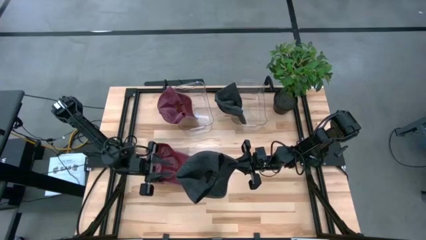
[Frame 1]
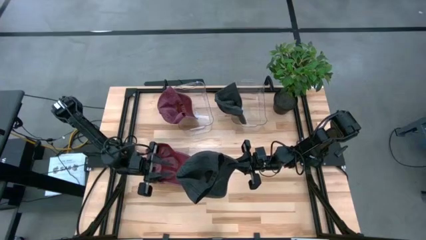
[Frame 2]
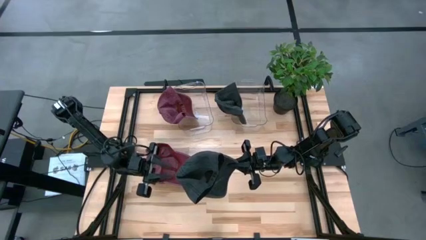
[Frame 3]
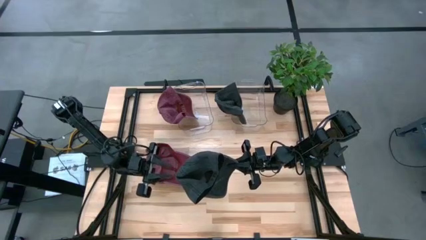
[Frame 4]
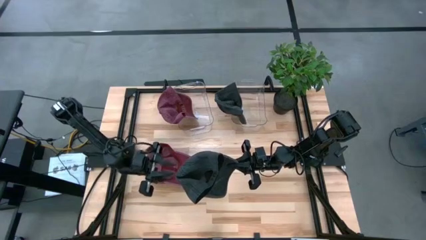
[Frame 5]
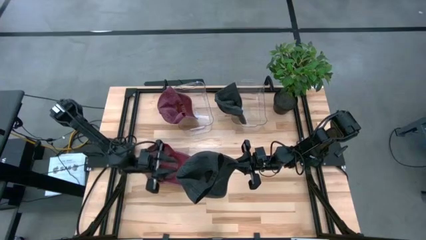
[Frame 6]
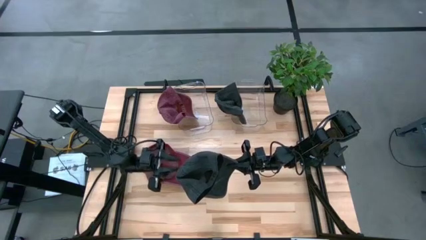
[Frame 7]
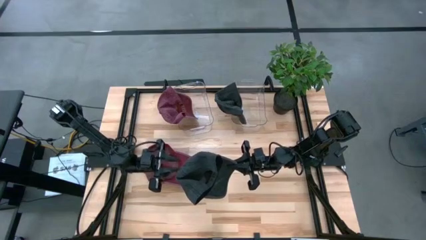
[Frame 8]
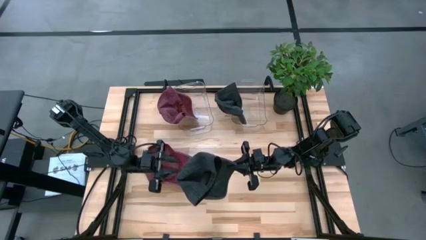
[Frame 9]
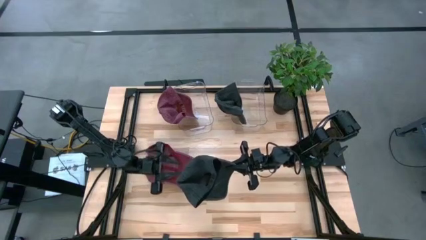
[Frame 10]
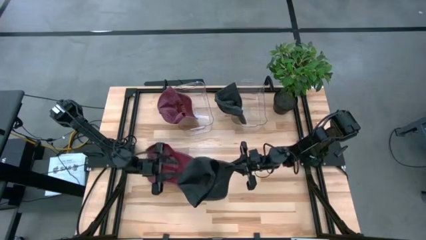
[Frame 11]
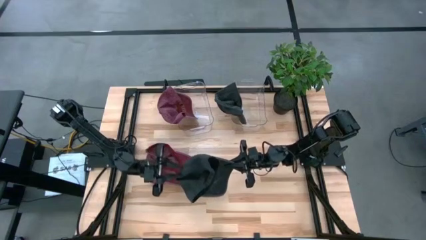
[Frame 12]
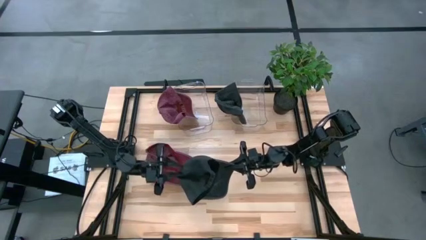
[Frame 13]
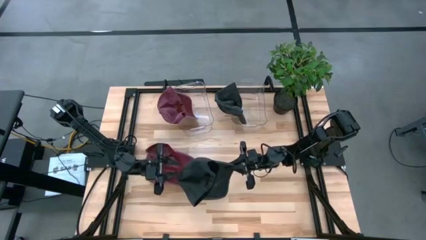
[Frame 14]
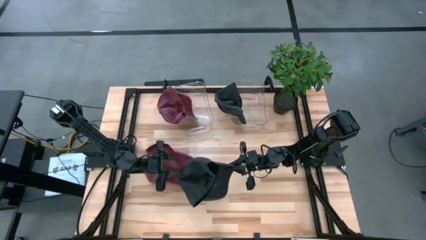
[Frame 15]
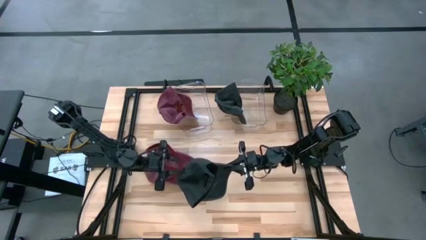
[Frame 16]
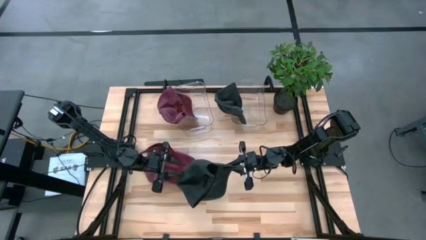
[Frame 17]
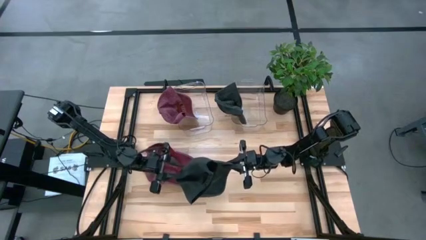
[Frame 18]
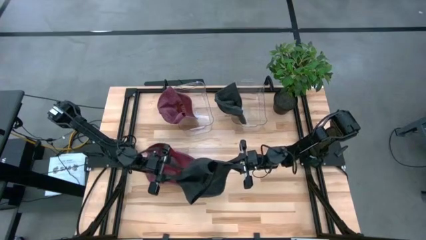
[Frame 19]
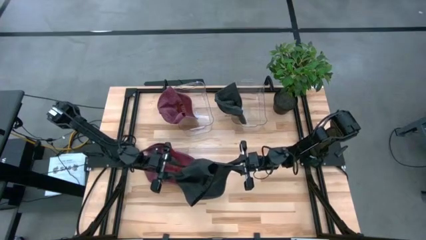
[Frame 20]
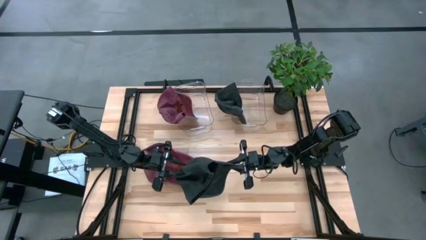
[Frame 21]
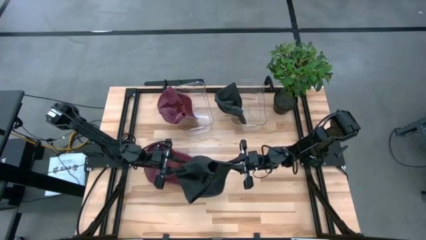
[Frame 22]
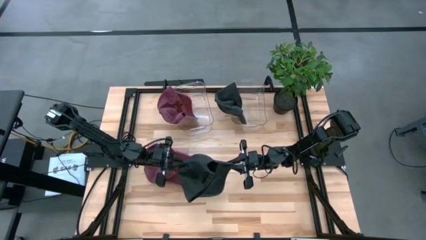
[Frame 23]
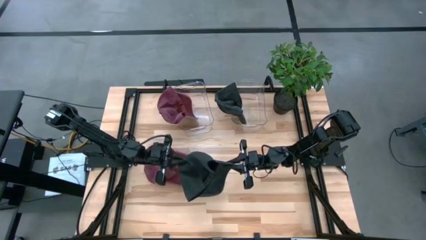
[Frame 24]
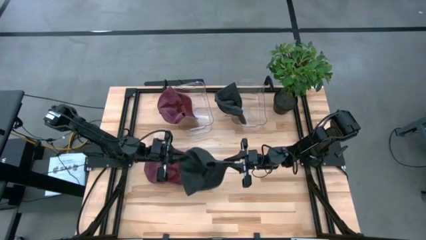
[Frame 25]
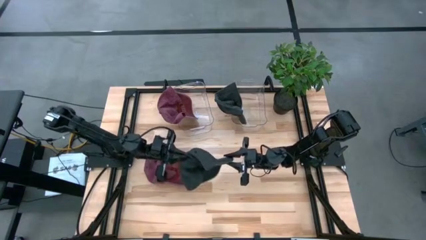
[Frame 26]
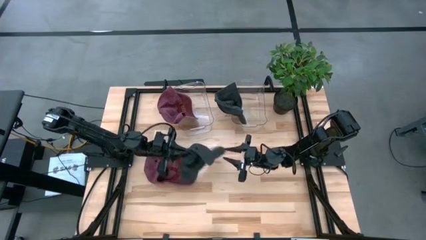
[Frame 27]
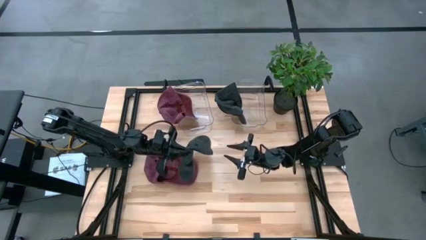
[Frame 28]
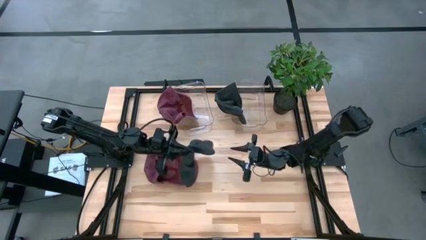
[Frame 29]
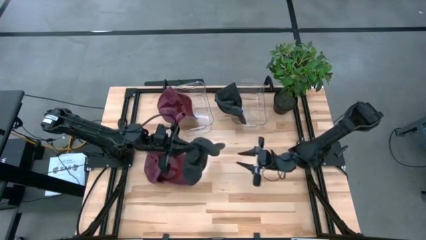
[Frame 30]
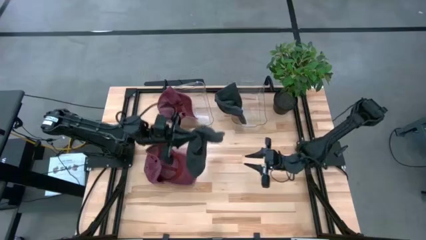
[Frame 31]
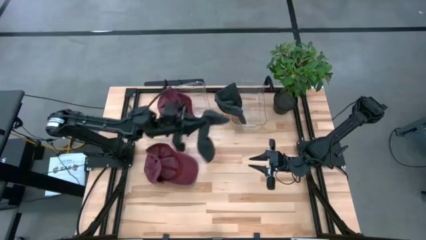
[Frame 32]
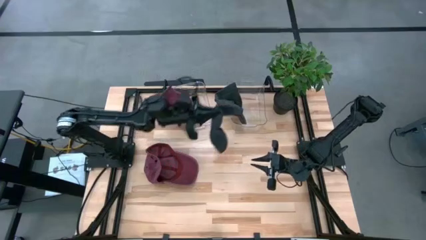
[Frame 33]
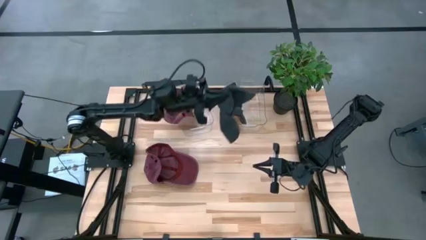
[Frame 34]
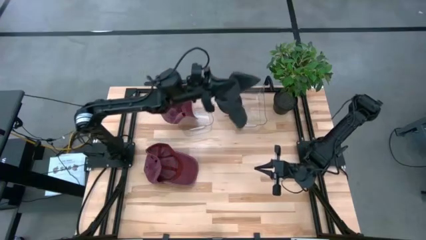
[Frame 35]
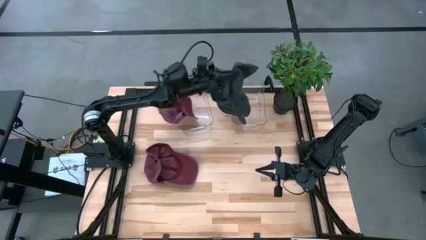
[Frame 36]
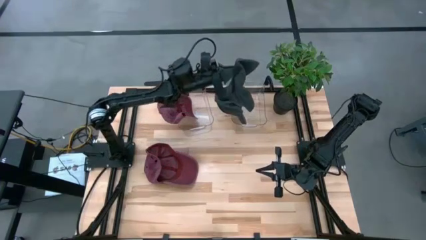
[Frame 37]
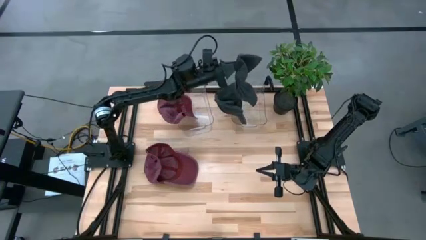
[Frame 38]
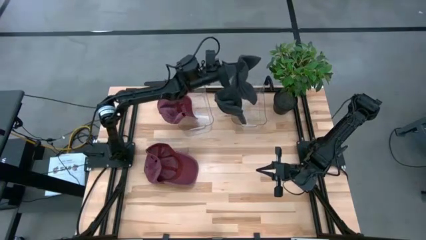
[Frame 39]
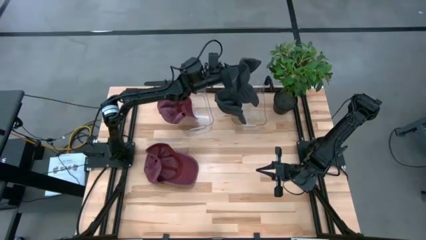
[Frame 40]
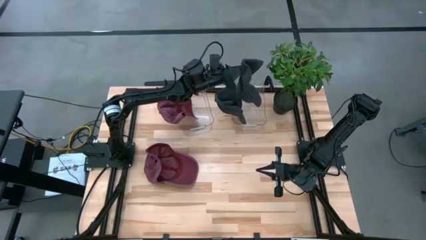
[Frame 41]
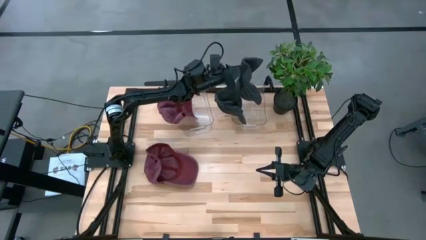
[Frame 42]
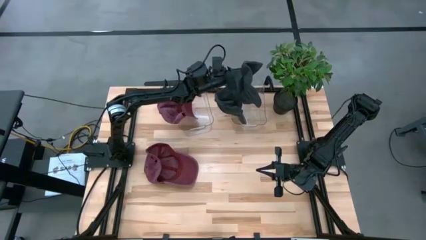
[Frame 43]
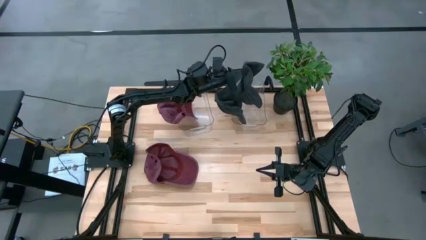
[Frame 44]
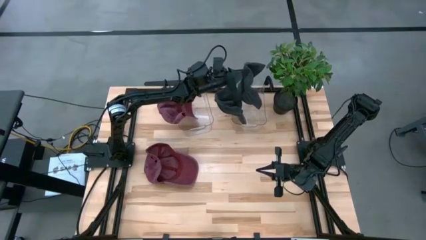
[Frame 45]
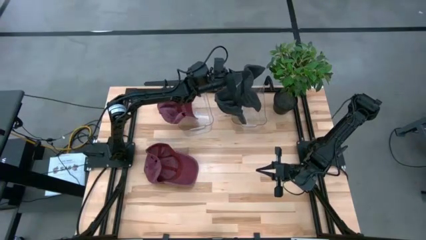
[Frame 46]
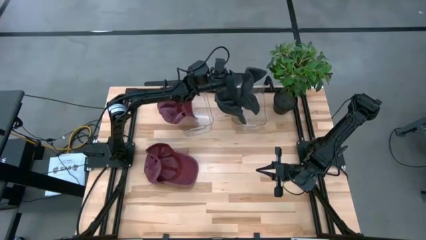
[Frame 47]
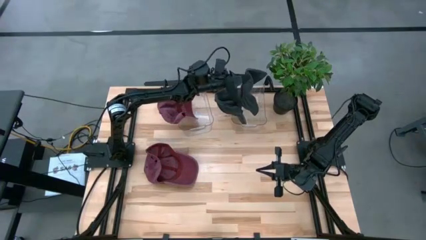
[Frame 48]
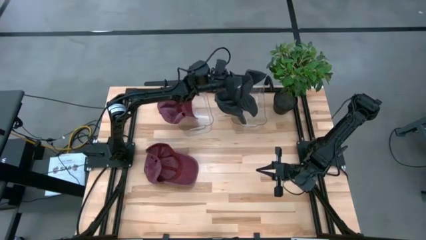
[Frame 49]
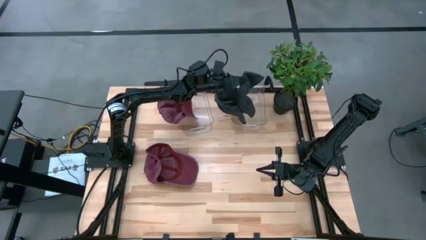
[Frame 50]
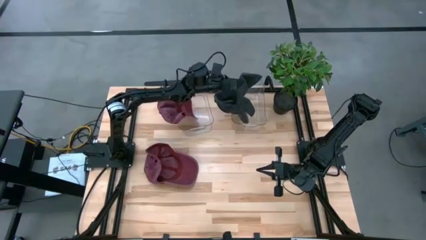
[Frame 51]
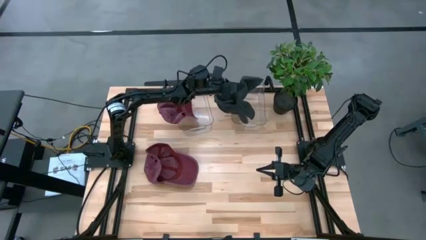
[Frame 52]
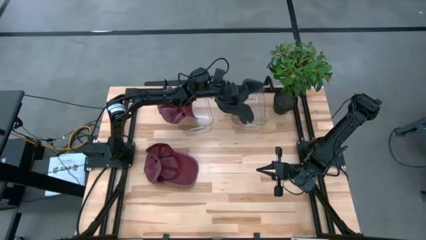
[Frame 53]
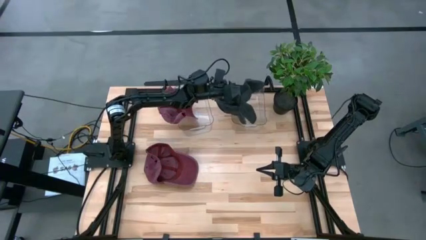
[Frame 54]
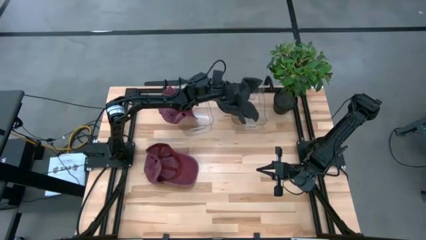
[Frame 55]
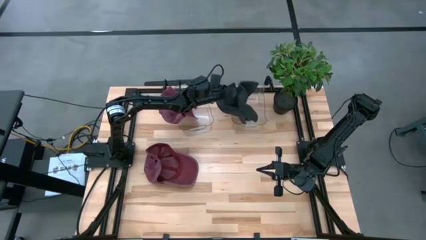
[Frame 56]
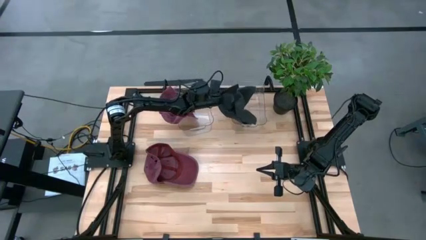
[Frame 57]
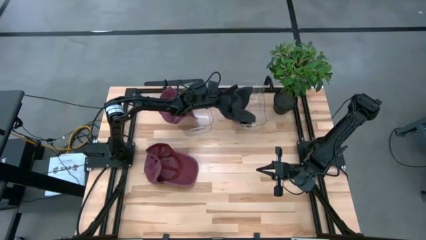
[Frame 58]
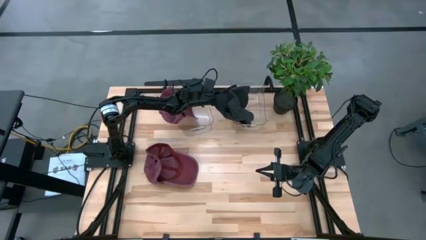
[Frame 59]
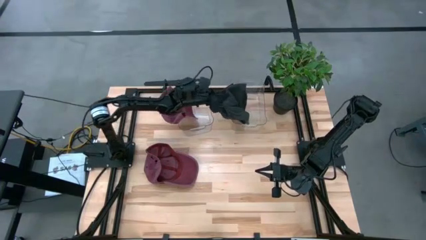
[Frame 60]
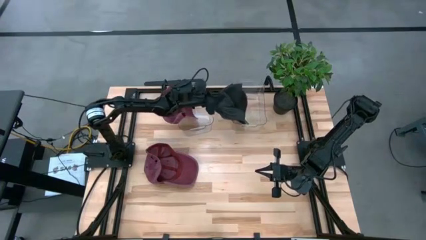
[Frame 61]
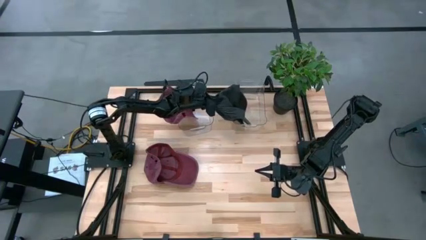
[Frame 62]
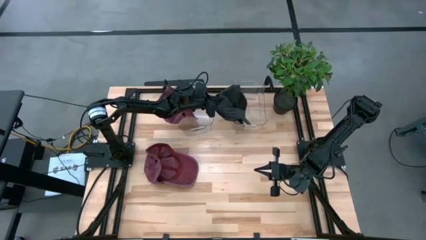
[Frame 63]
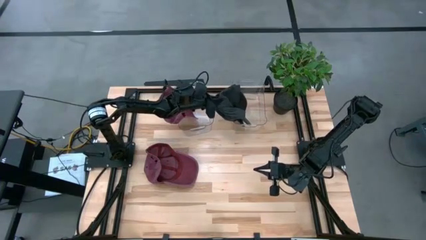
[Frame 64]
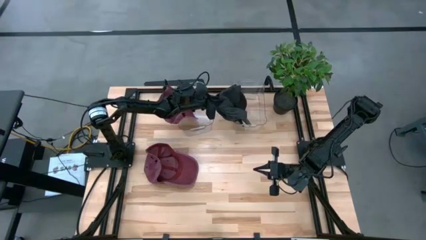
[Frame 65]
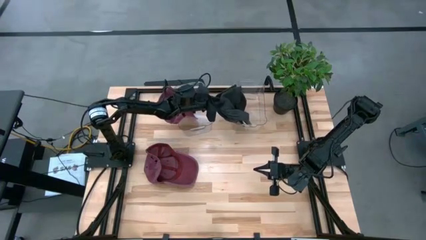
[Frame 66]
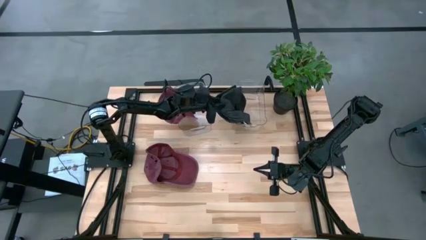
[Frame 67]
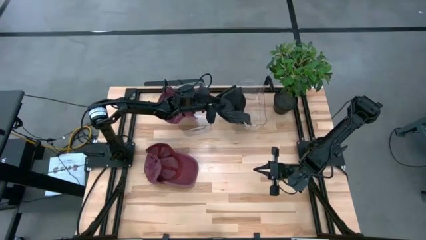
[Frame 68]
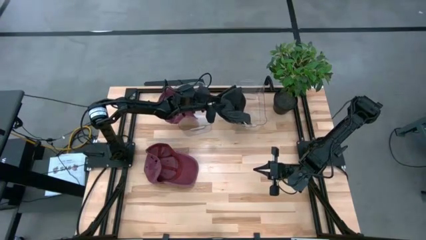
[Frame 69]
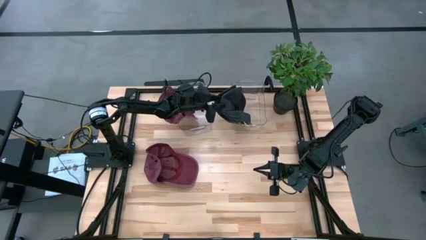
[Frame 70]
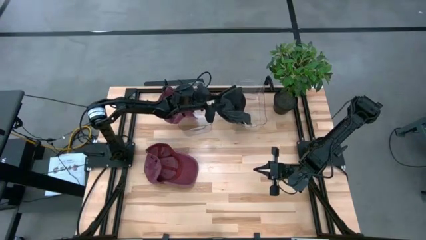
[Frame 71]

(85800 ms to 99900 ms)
Task: Pick & Place hat
Put the black cap in the right transparent bin
